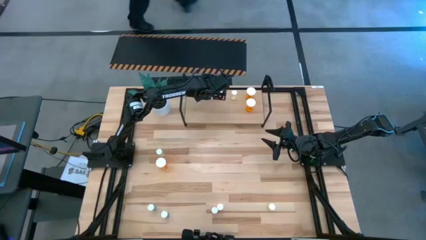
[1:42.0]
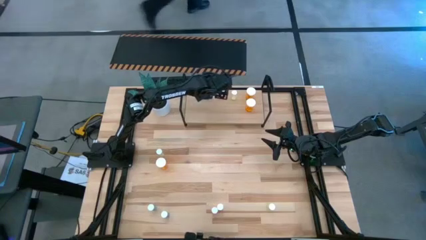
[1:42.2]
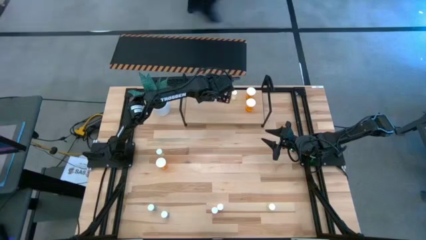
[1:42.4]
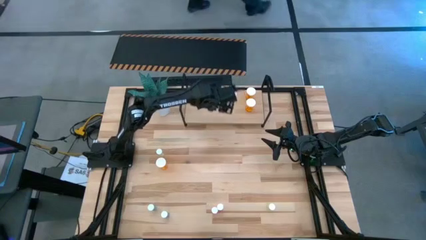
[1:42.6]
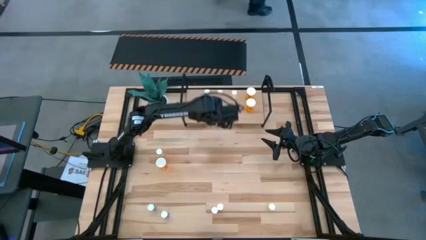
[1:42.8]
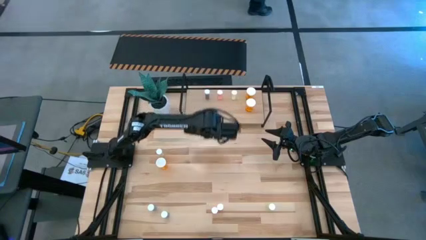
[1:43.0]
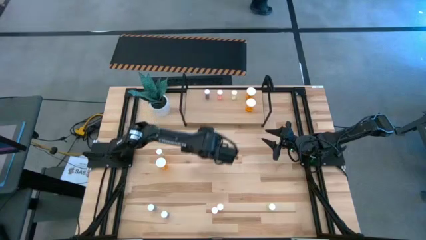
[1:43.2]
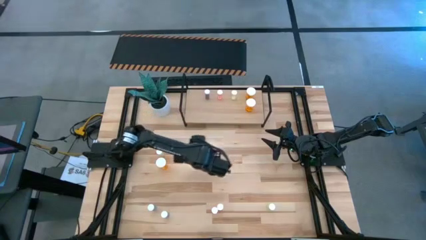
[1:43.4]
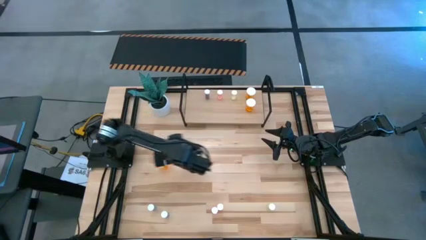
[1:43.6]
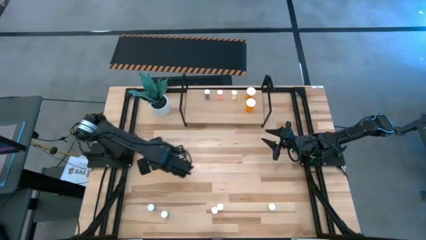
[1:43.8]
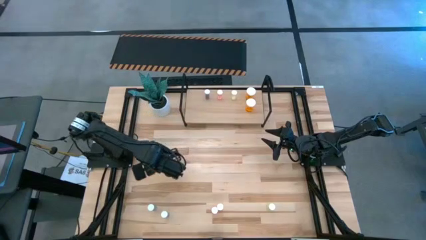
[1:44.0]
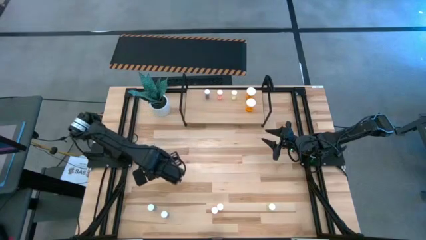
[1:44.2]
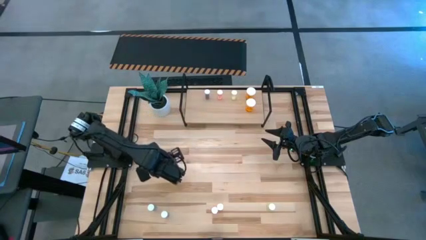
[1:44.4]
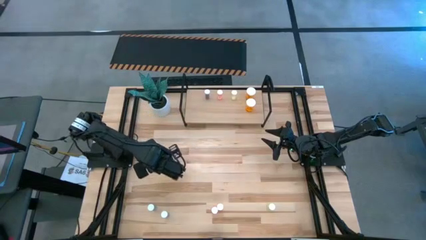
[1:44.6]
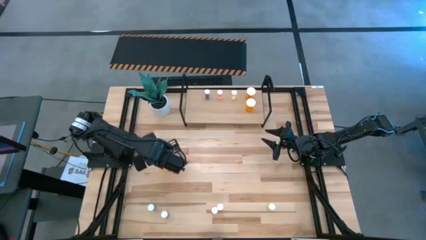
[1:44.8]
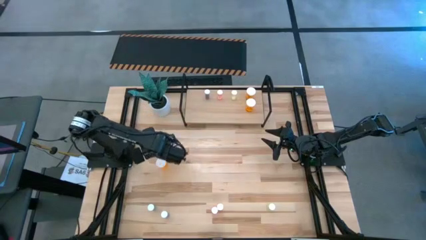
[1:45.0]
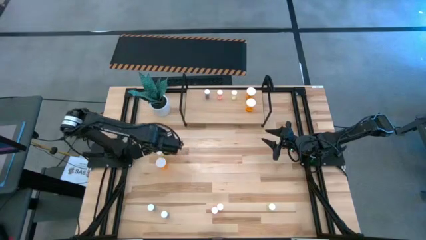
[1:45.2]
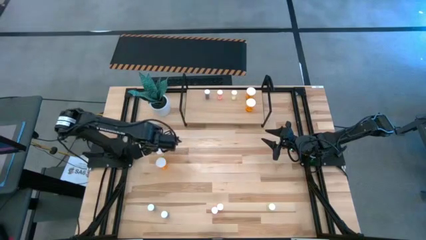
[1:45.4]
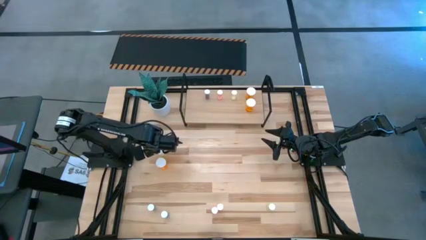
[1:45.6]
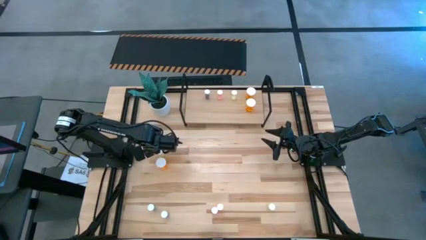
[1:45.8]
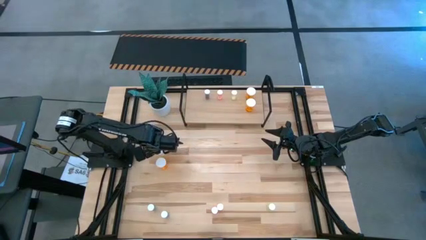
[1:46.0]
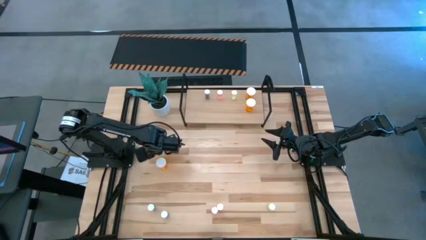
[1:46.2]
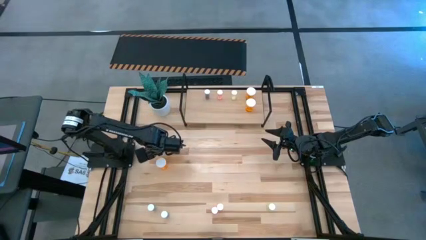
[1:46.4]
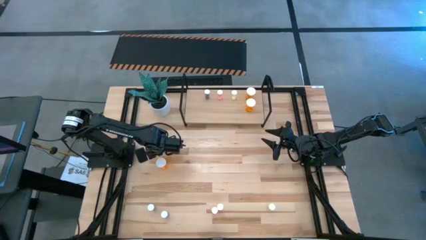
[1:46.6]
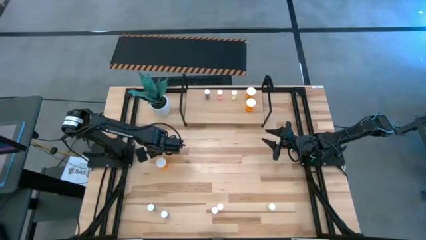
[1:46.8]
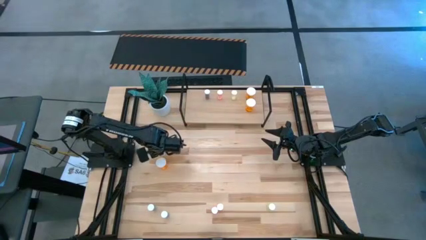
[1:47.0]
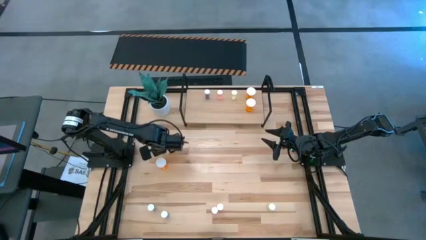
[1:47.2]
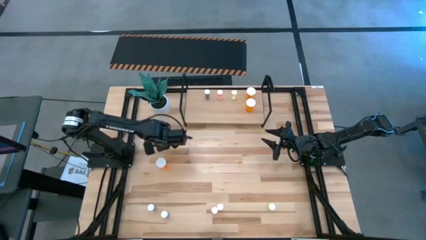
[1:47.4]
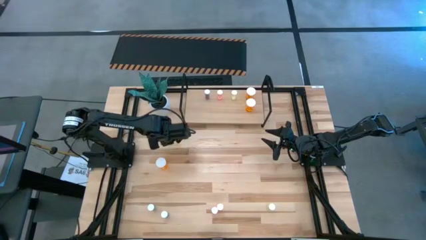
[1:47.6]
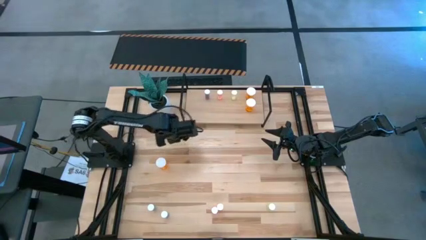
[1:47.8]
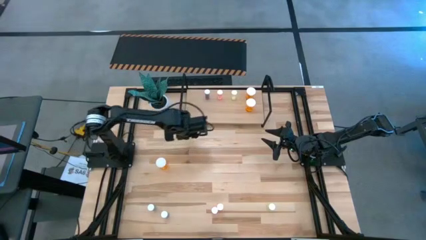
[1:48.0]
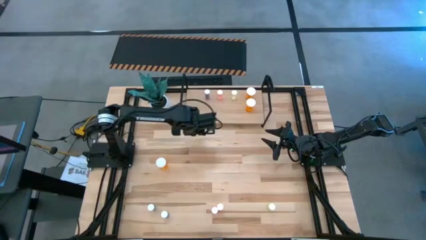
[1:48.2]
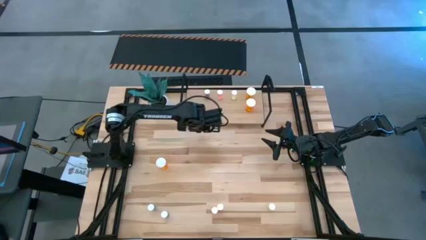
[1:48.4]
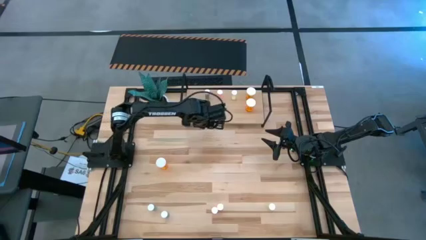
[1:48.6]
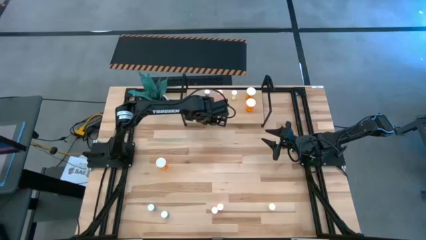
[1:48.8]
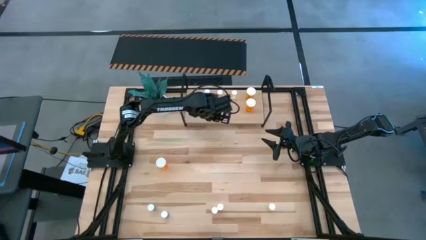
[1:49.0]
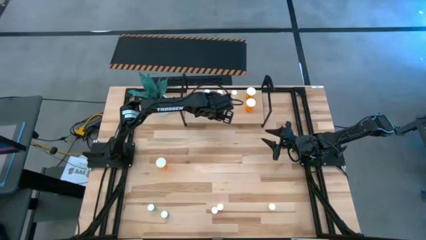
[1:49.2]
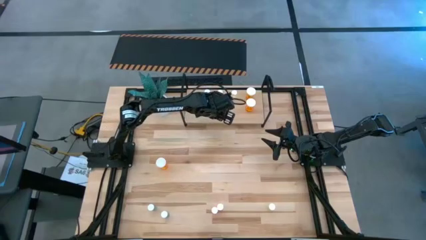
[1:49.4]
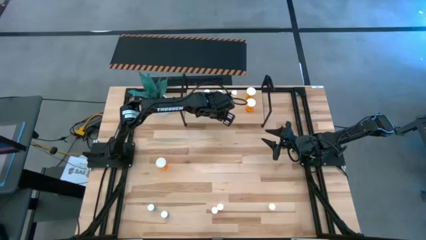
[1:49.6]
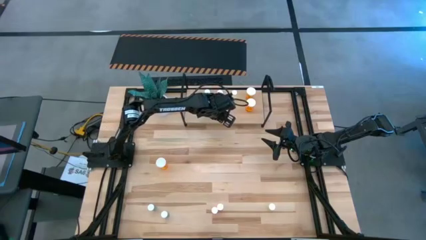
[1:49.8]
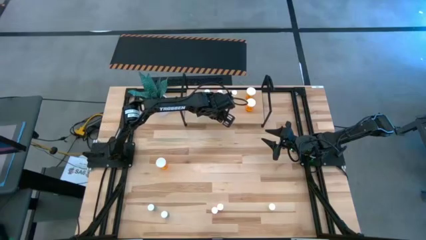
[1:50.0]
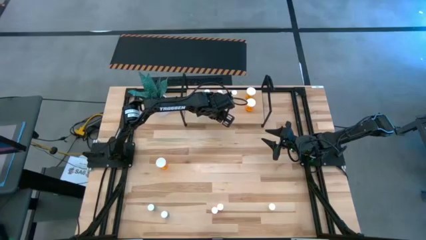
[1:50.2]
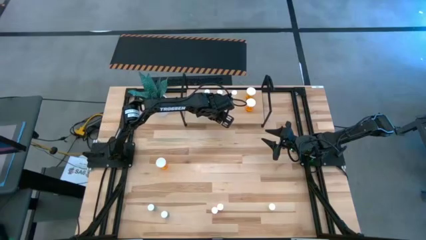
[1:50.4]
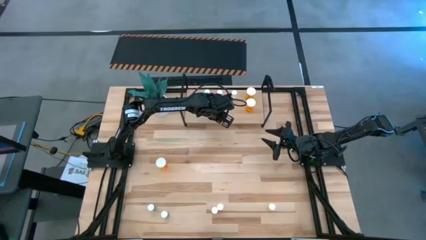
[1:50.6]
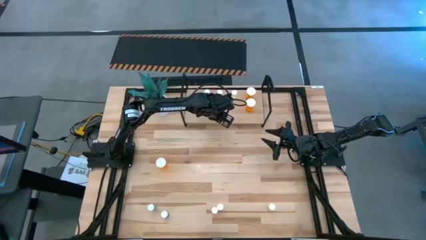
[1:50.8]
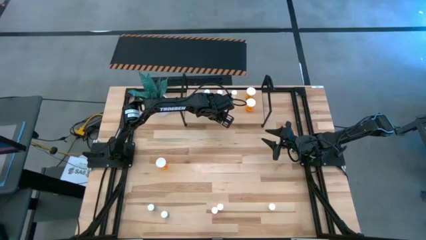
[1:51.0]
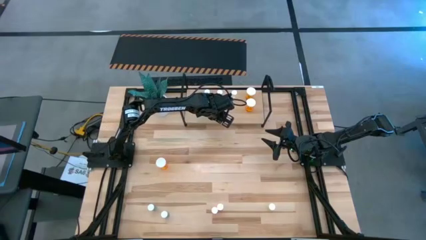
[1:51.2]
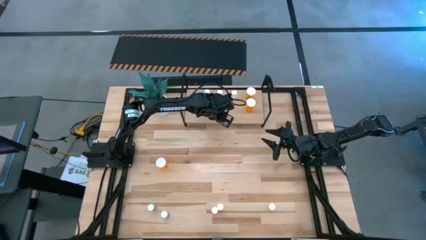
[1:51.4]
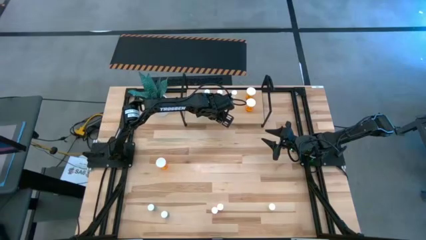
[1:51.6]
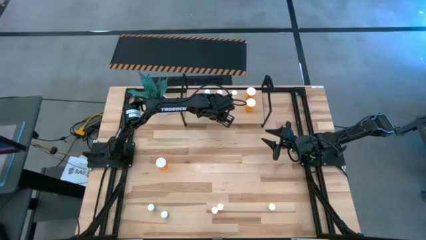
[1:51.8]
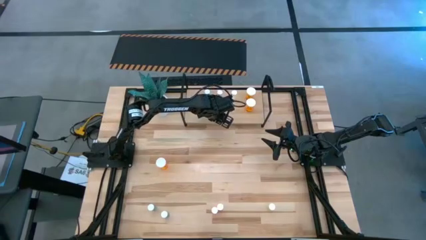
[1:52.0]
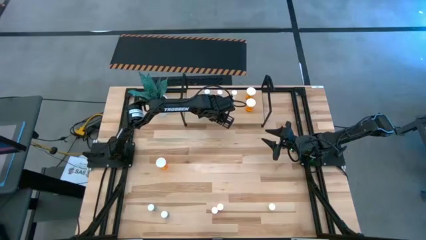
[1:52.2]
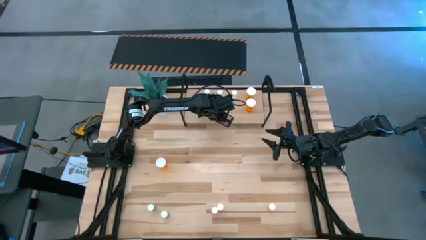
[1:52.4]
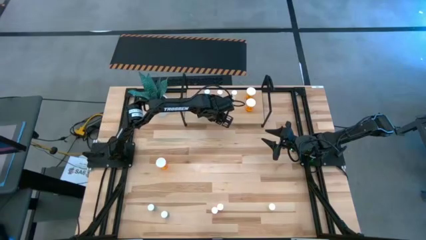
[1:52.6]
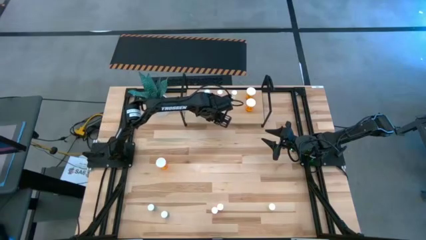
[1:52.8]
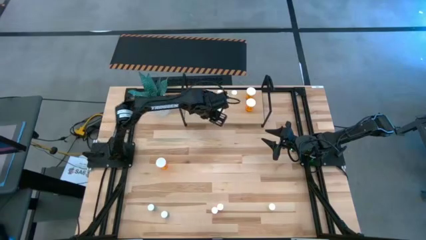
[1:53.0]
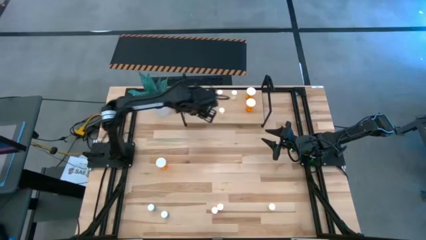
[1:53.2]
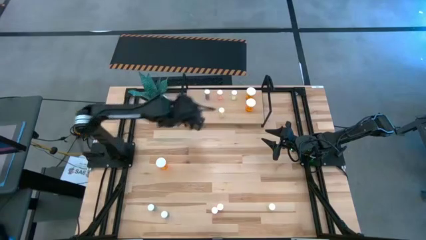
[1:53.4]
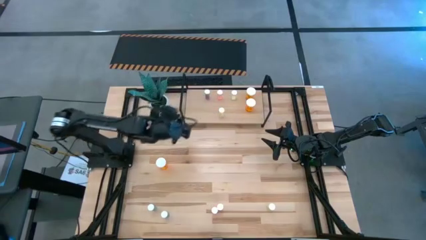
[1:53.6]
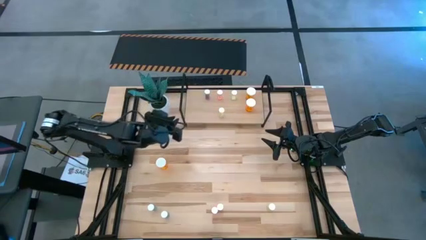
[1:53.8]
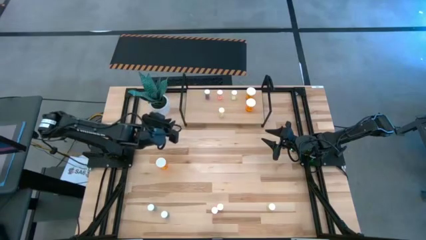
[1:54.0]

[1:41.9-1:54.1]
Task: Pick and place medicine bottles onto shelf by color
Put the yellow pill bottle on the shelf

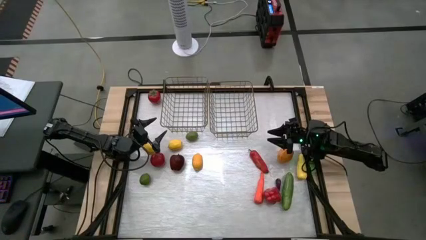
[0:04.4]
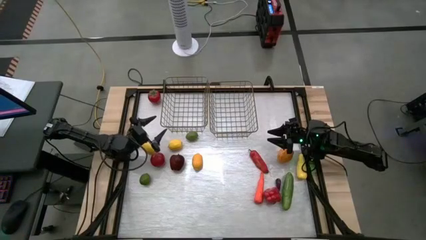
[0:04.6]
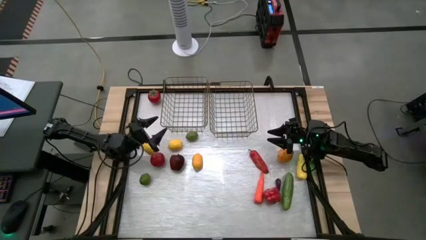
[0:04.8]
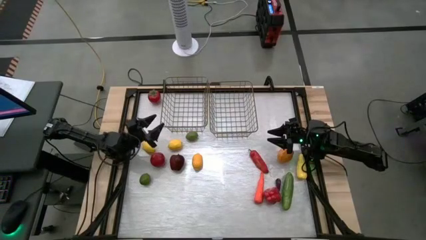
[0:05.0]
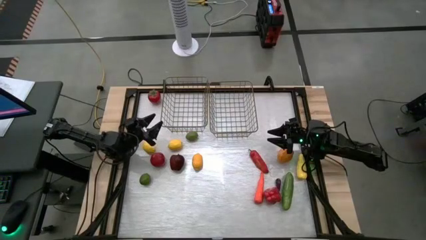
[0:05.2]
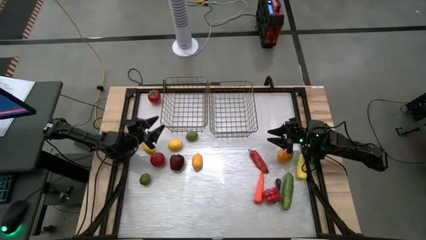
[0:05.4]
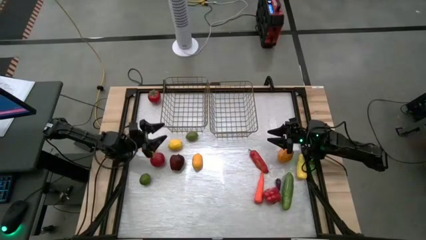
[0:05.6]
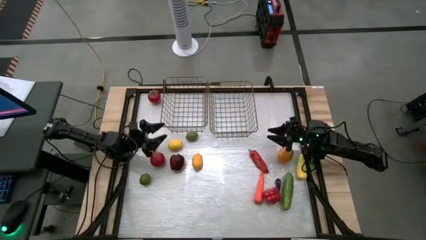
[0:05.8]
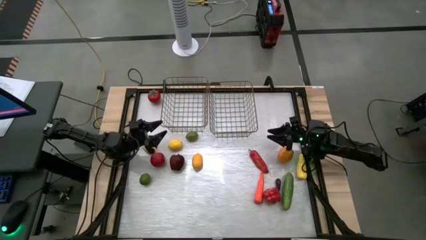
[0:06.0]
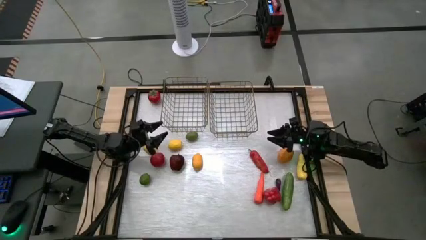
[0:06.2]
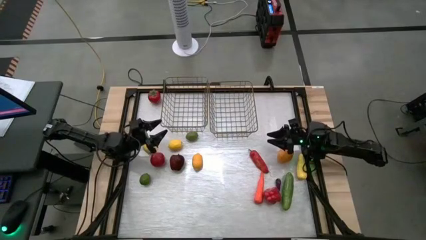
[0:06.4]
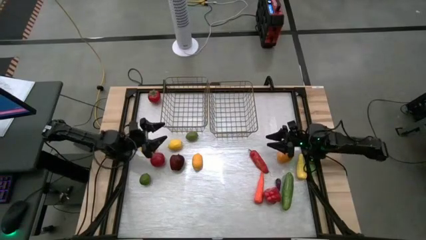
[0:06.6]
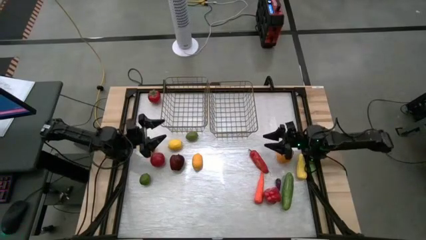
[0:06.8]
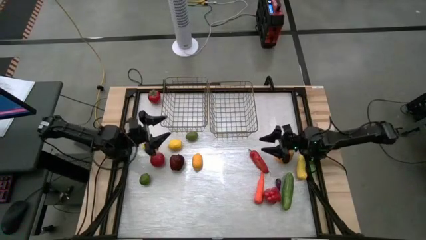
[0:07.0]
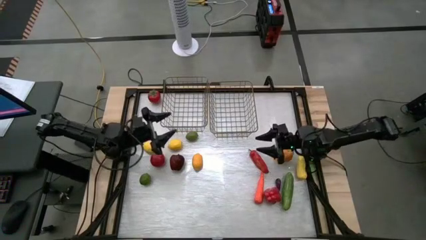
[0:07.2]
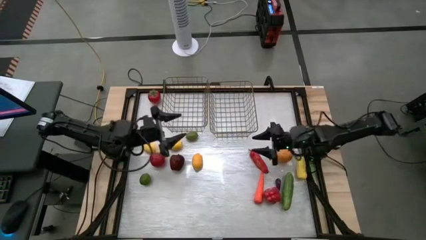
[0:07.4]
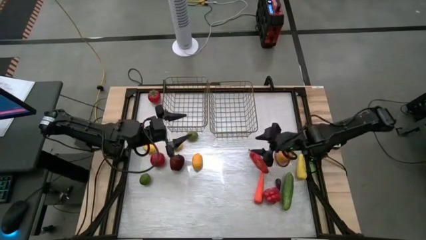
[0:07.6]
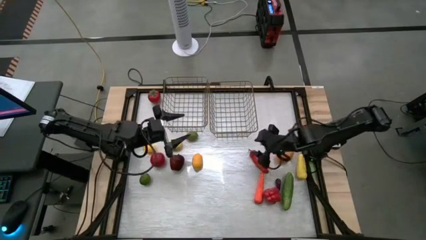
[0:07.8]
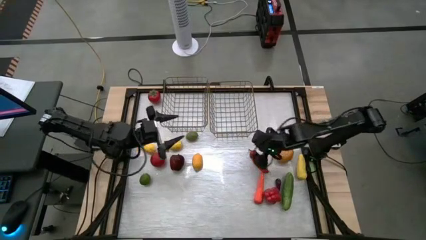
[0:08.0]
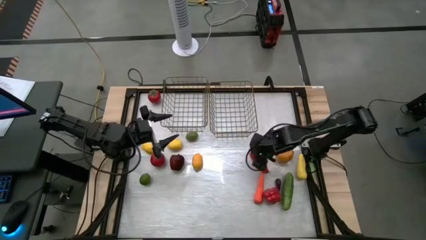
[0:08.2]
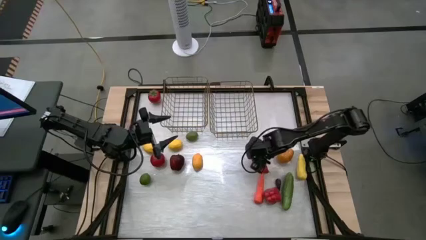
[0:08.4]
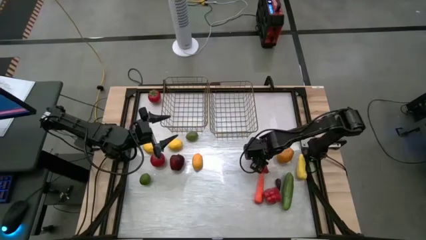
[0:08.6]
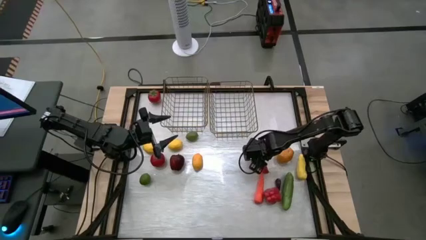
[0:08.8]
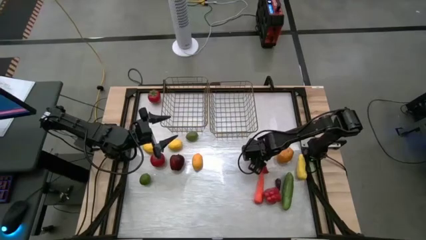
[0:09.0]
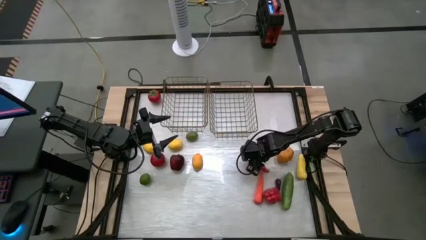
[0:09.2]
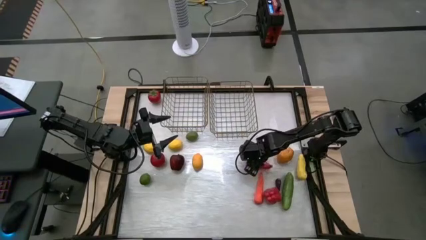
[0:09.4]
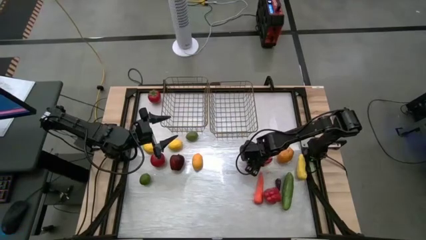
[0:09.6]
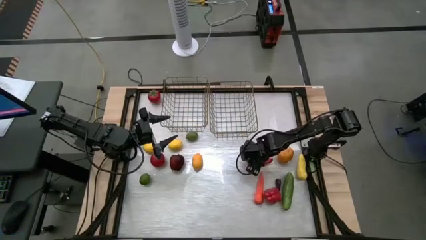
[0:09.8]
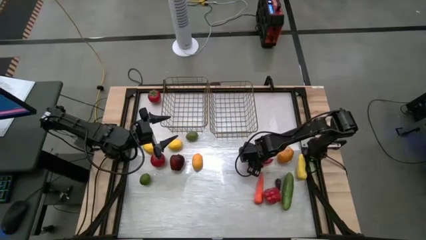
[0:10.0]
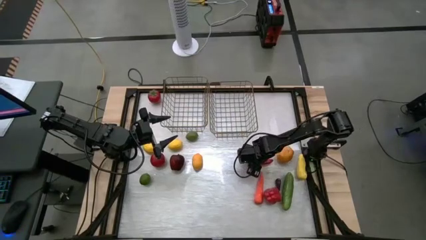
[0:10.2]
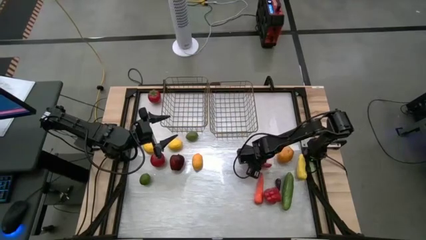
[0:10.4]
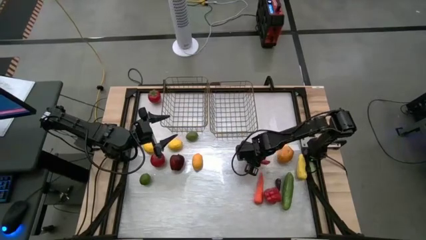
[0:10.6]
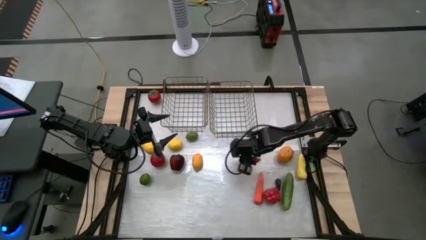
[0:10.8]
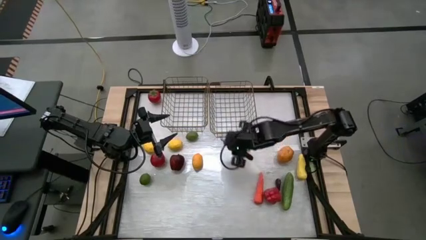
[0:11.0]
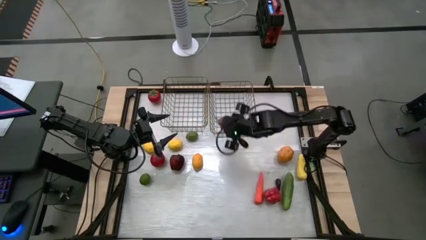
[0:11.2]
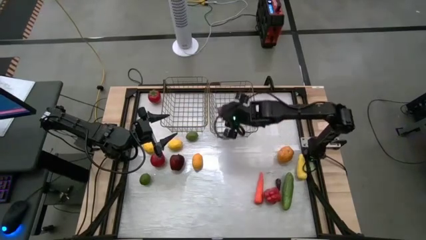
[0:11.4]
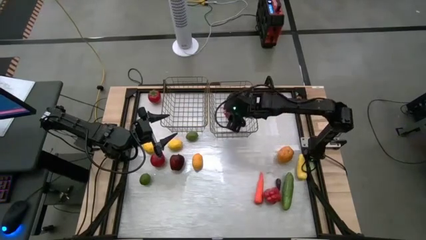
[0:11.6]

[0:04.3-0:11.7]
Task: Sort produce into baskets
Put the chili pepper into the right wire basket
